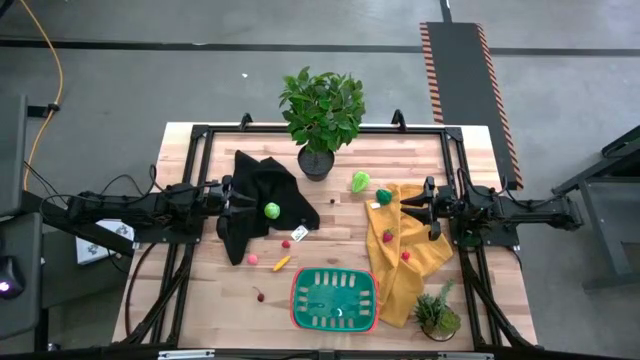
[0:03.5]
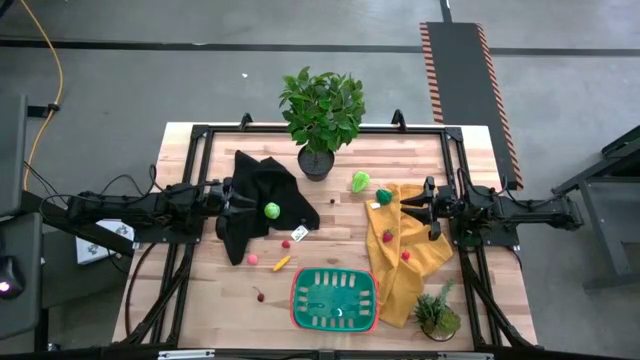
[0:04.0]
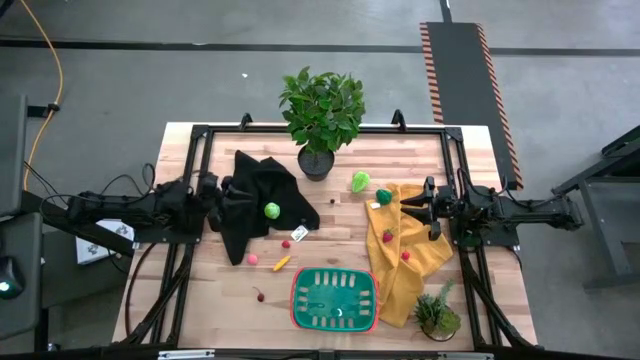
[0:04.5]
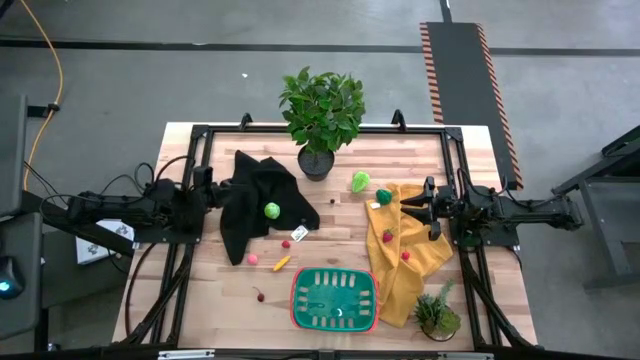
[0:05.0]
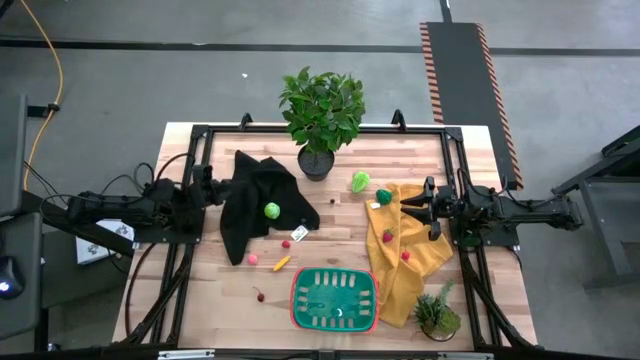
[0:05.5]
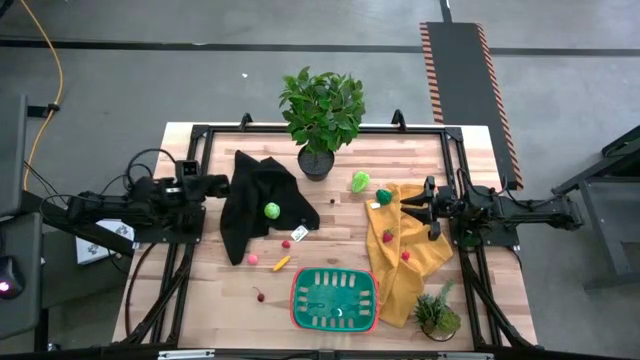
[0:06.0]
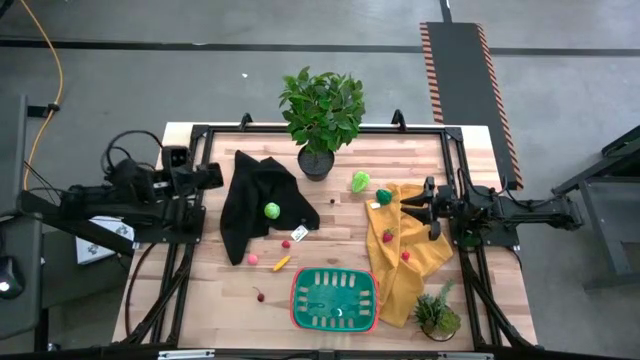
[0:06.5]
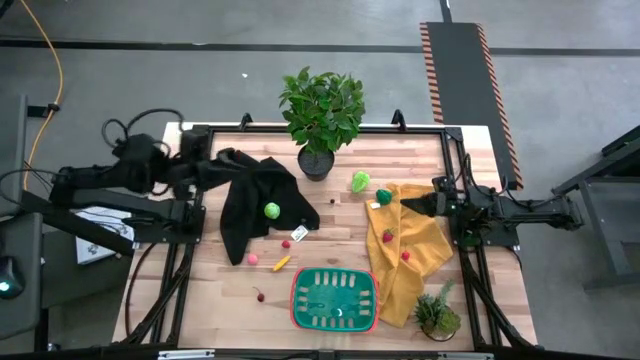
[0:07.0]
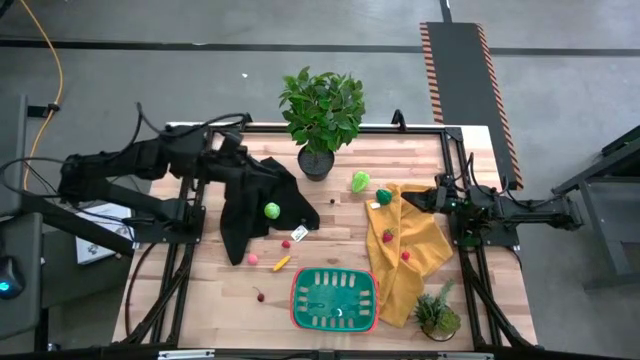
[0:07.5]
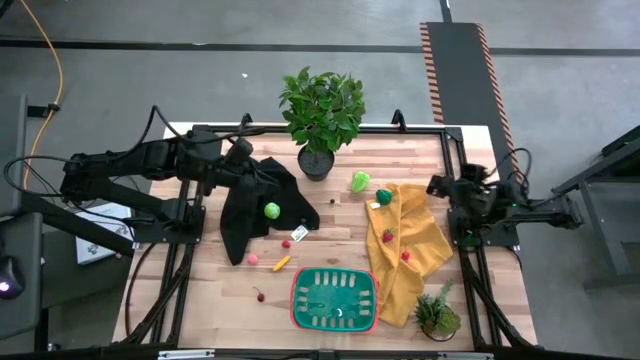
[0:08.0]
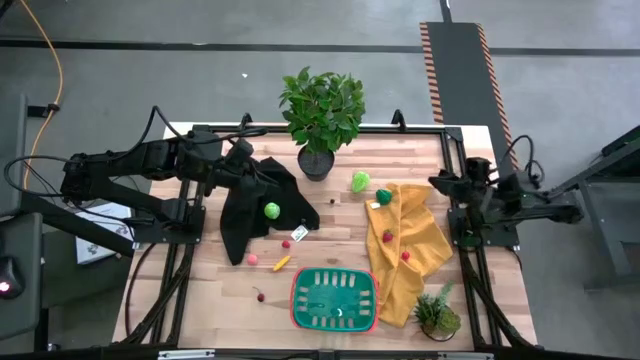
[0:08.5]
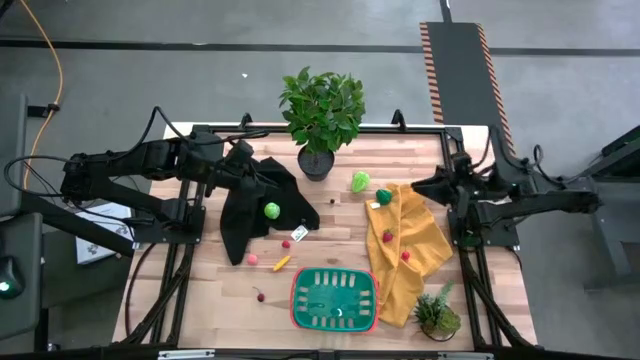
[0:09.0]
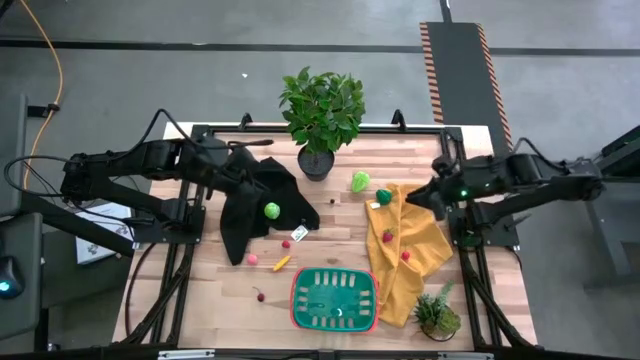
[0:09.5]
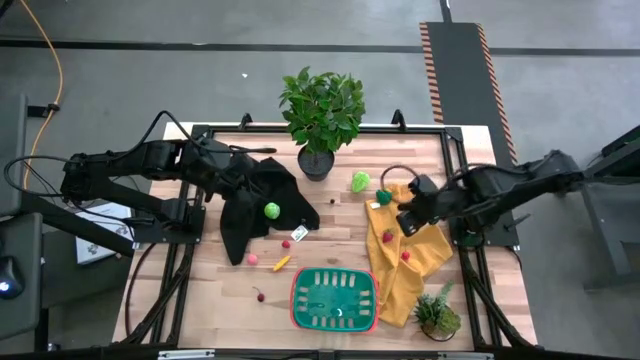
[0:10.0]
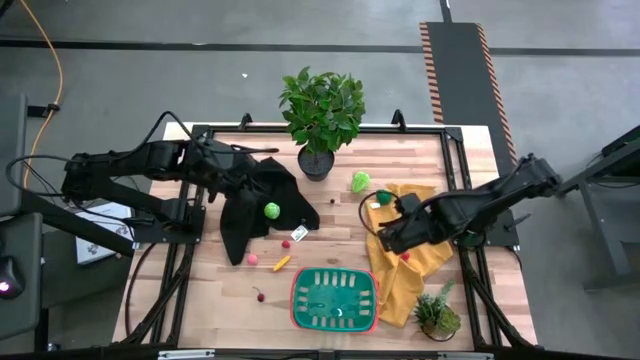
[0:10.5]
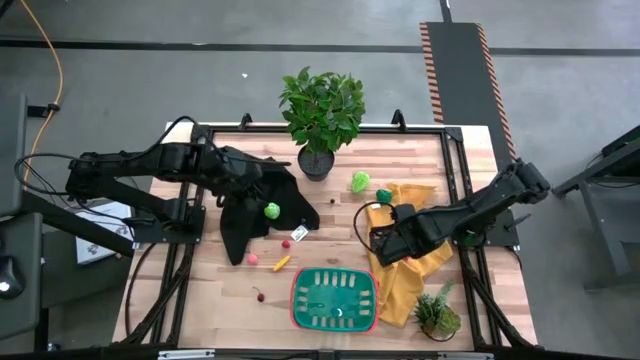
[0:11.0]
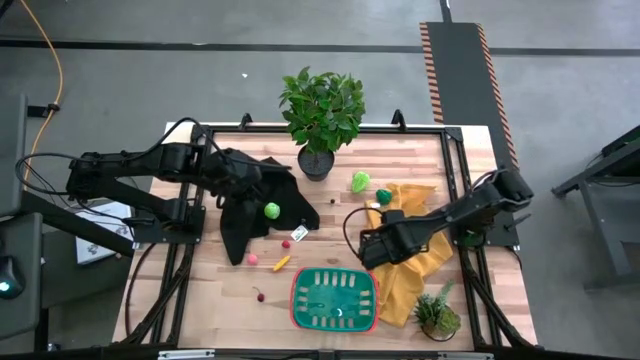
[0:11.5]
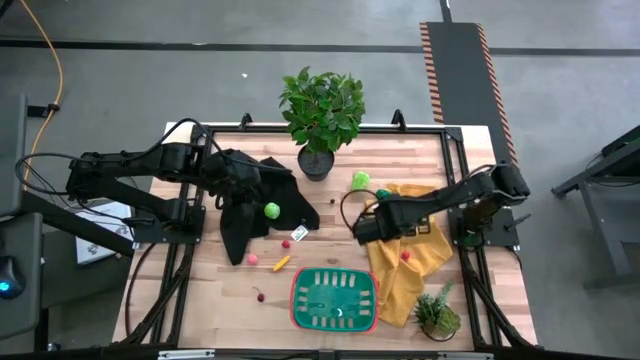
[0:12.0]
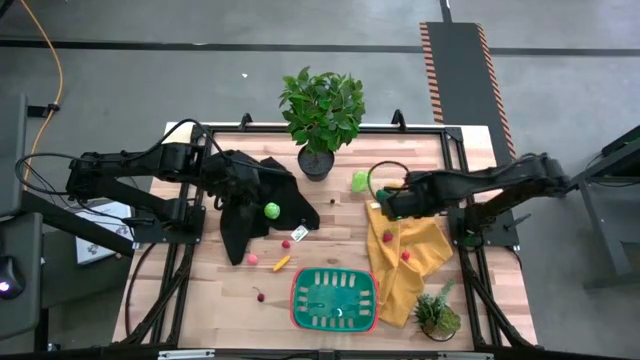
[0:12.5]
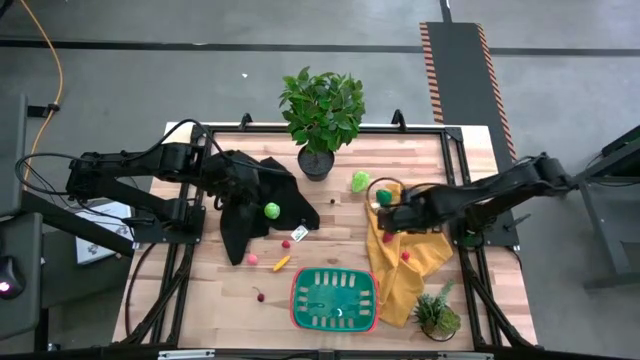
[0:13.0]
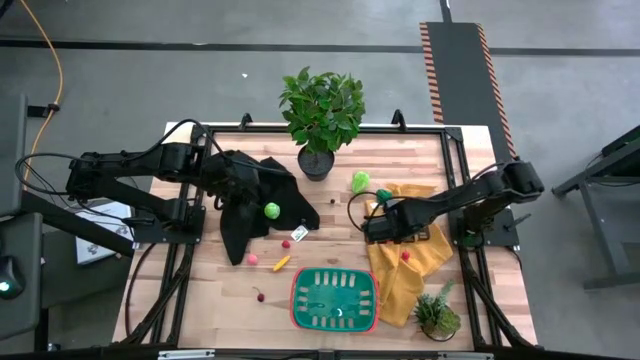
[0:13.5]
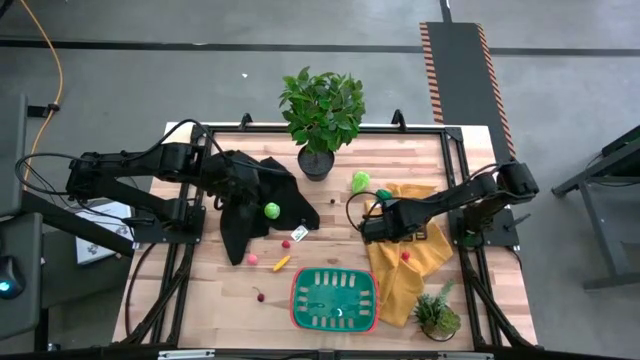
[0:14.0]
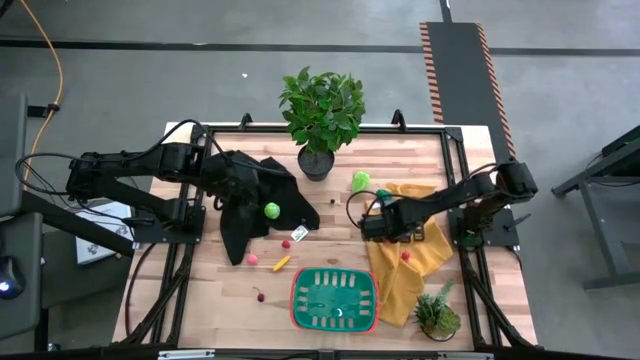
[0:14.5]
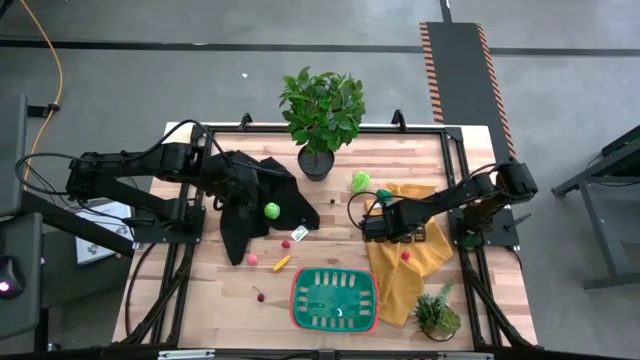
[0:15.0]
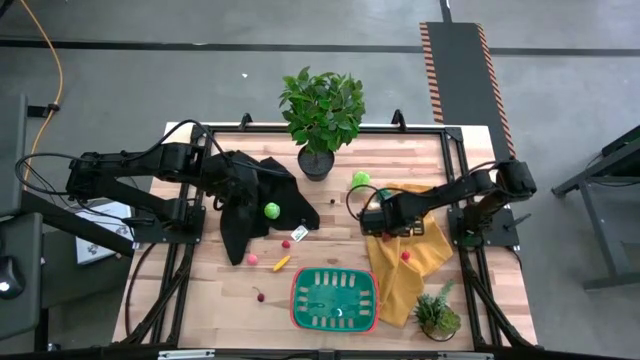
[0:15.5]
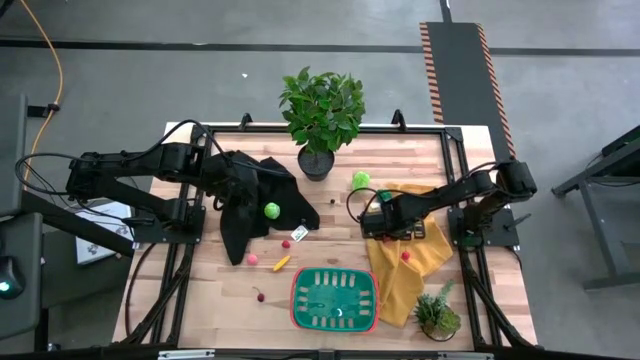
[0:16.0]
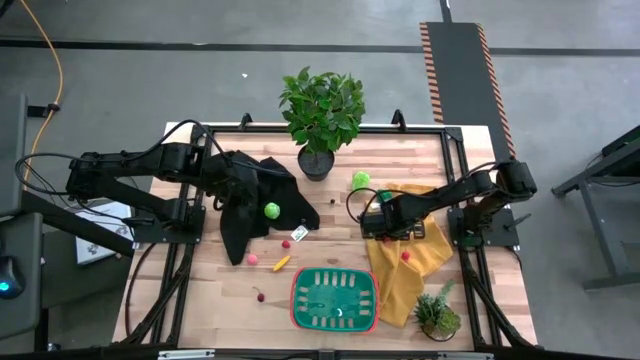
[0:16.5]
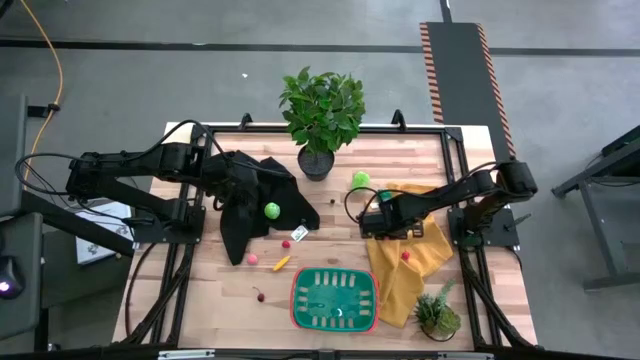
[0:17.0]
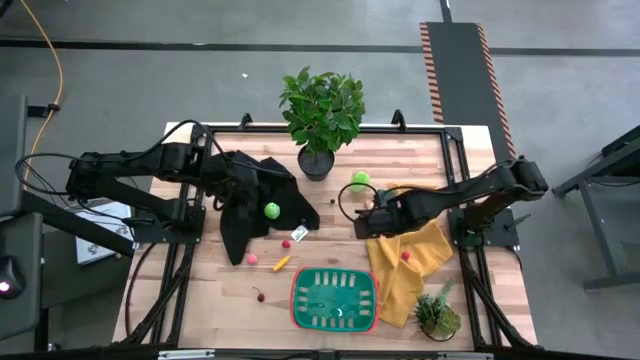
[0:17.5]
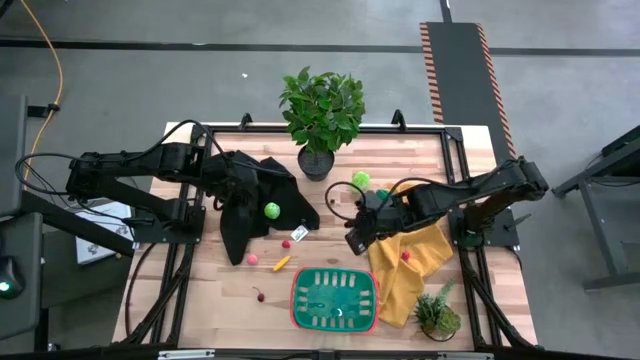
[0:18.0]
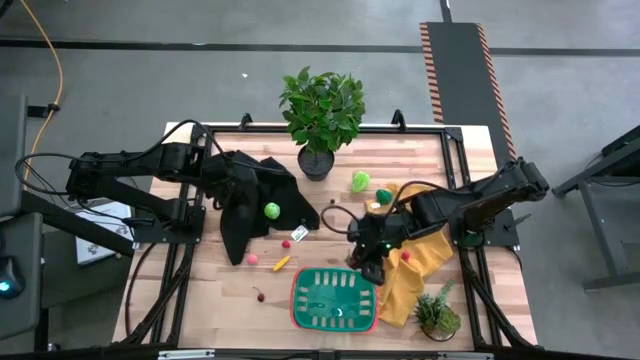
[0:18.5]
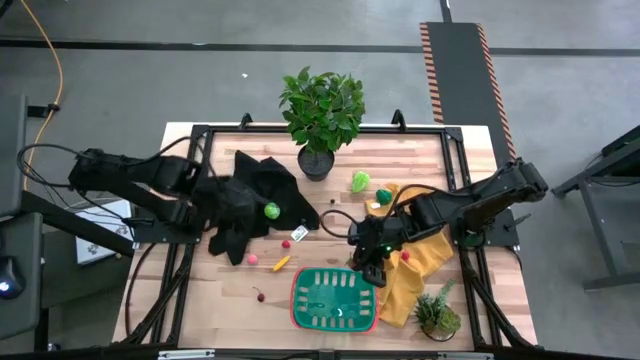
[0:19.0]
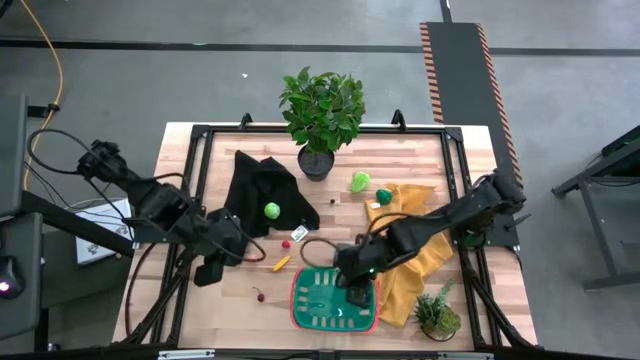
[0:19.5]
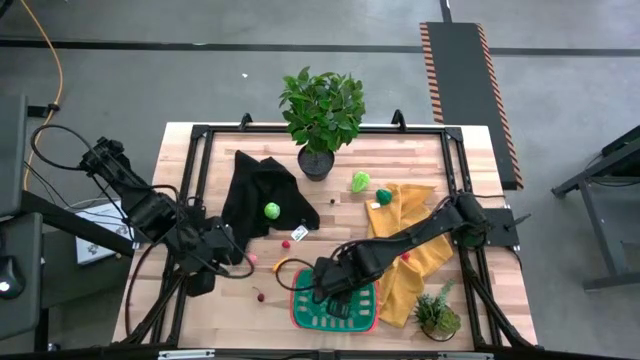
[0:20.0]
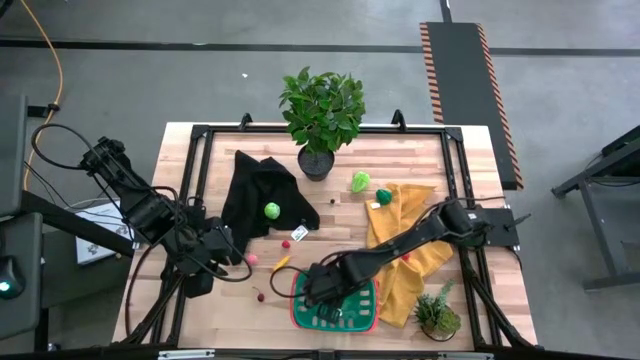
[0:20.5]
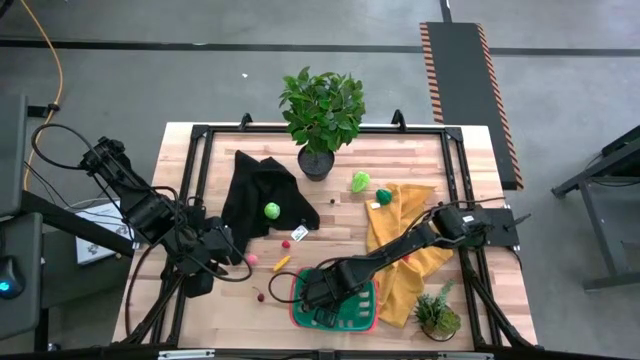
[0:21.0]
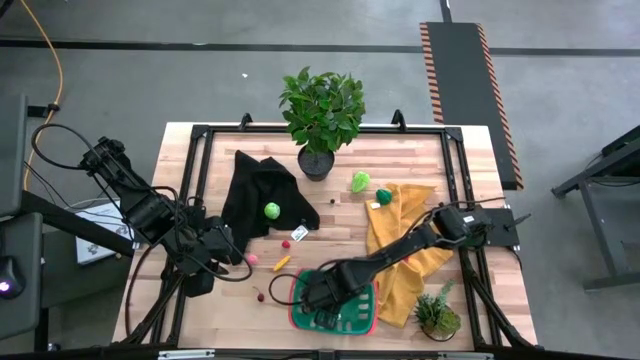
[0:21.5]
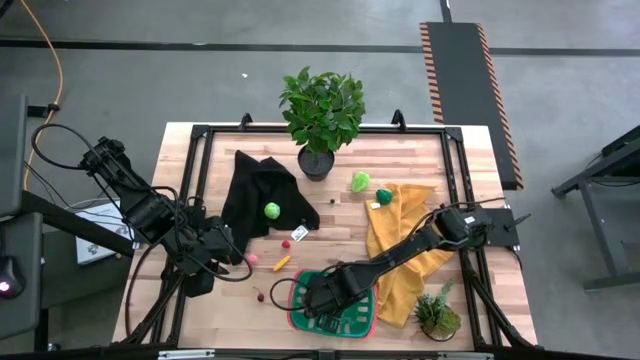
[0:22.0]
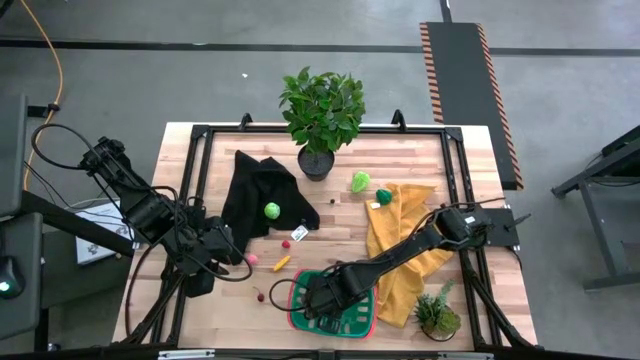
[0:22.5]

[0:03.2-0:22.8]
Task: Pick and placing Produce into tupperware
Put the red strawberry into the blue bin
